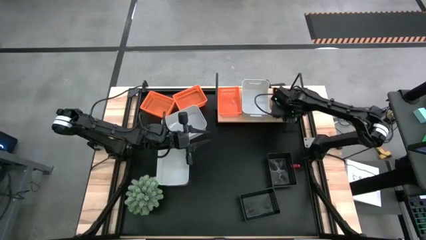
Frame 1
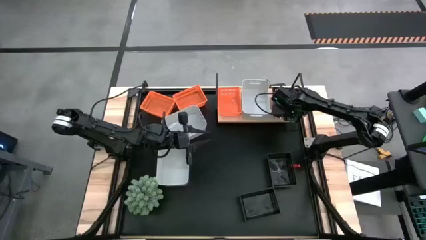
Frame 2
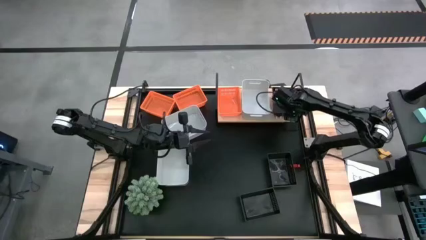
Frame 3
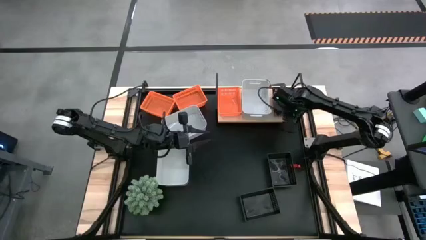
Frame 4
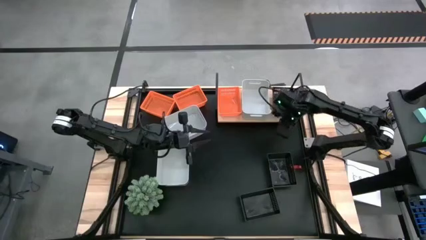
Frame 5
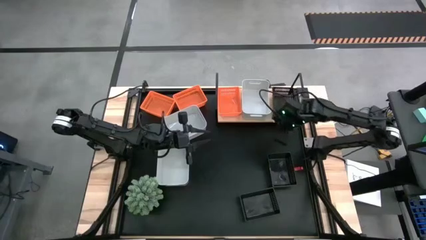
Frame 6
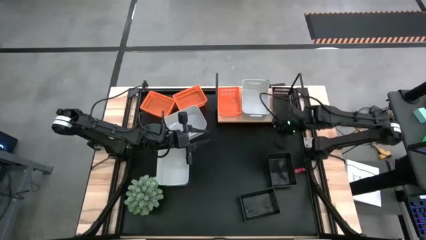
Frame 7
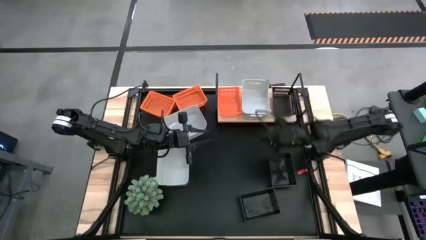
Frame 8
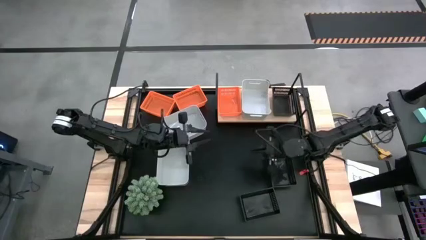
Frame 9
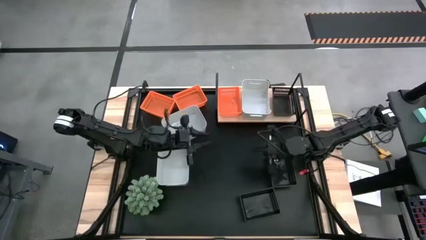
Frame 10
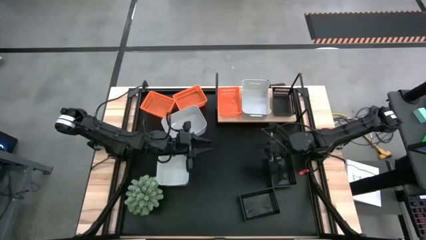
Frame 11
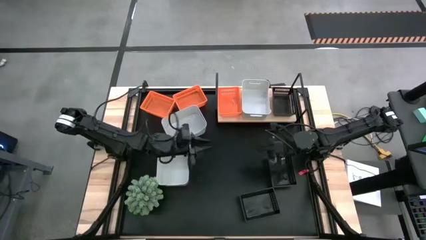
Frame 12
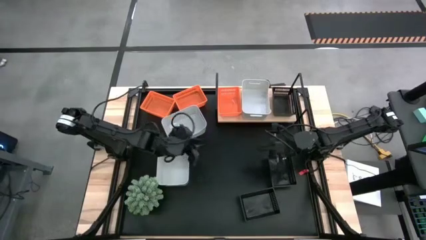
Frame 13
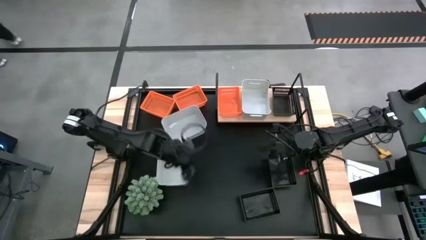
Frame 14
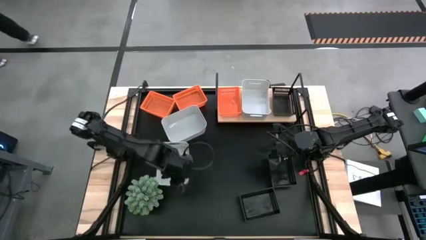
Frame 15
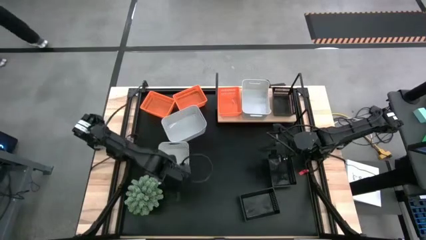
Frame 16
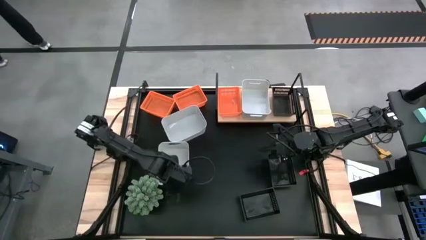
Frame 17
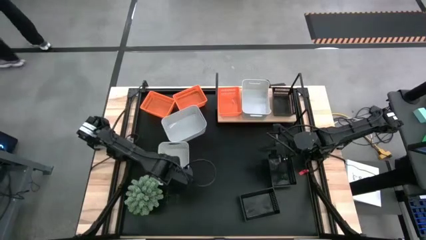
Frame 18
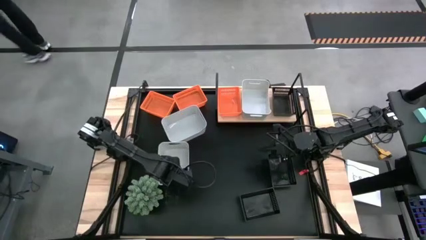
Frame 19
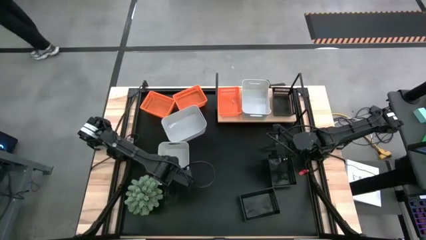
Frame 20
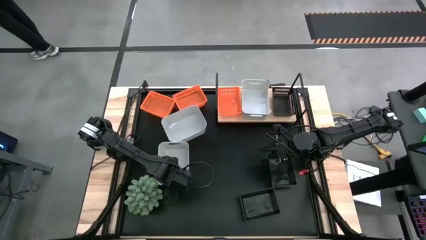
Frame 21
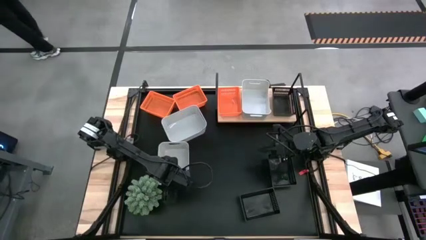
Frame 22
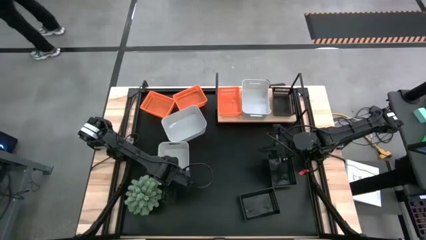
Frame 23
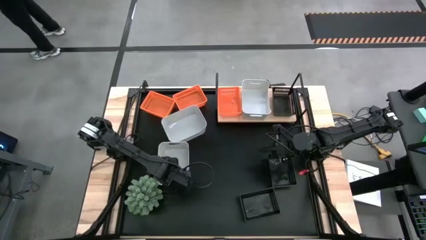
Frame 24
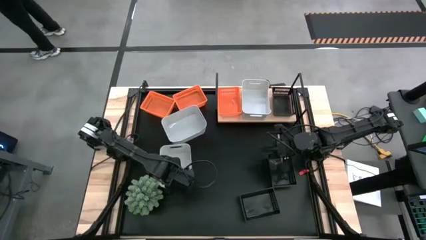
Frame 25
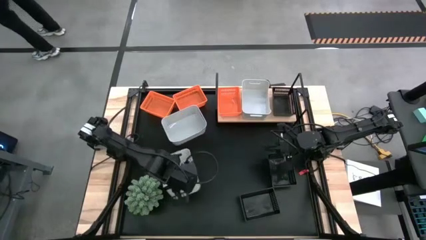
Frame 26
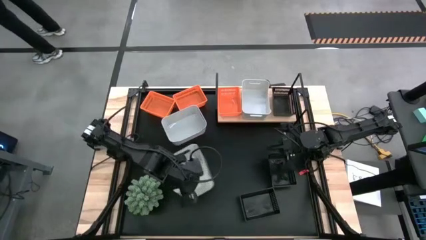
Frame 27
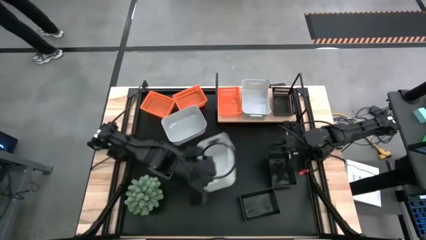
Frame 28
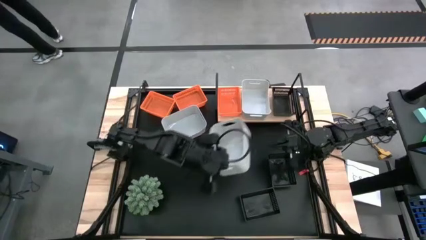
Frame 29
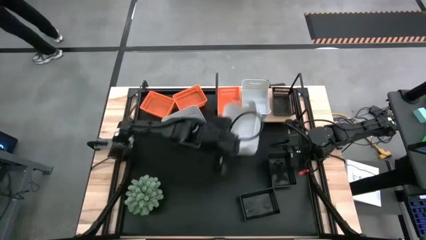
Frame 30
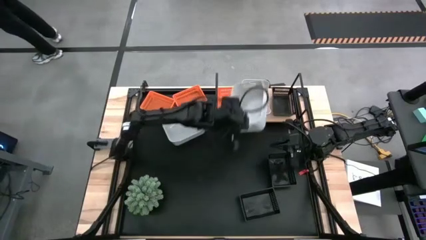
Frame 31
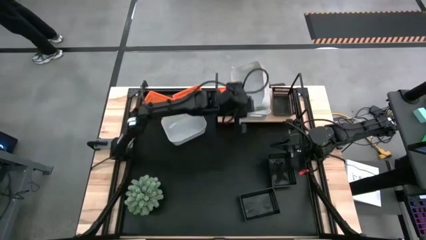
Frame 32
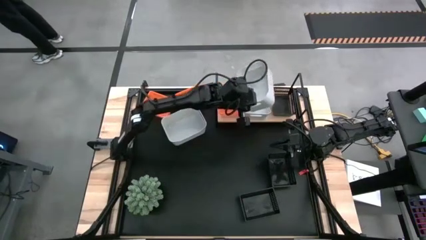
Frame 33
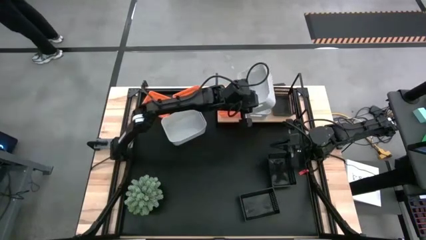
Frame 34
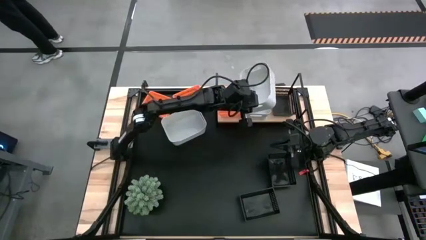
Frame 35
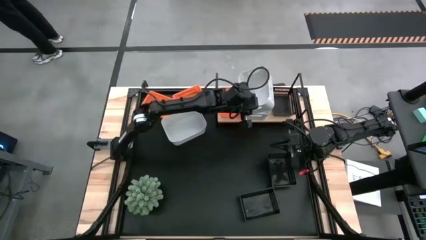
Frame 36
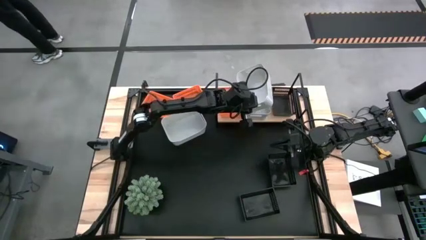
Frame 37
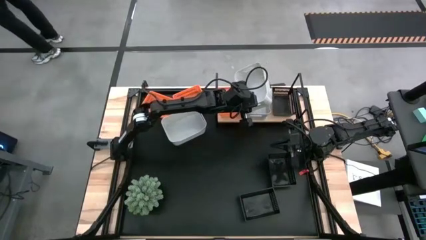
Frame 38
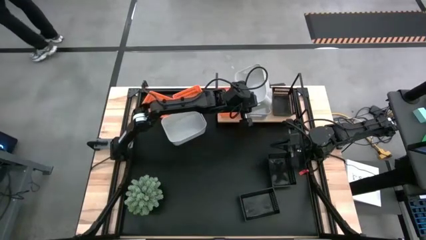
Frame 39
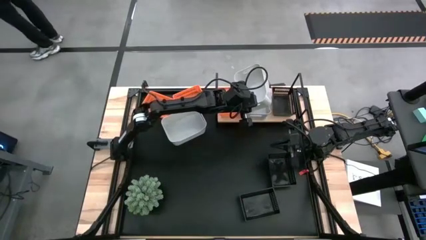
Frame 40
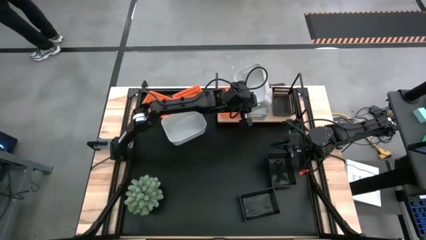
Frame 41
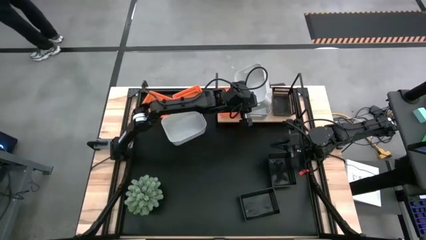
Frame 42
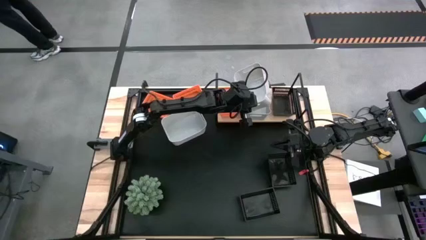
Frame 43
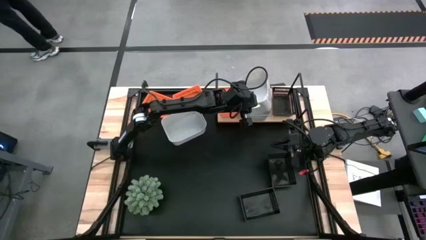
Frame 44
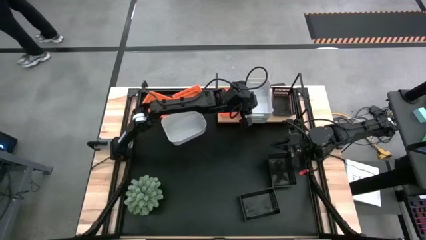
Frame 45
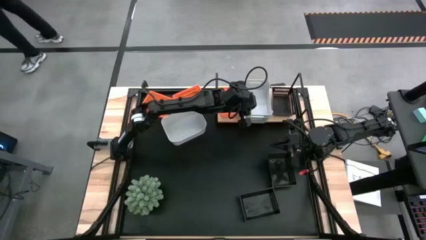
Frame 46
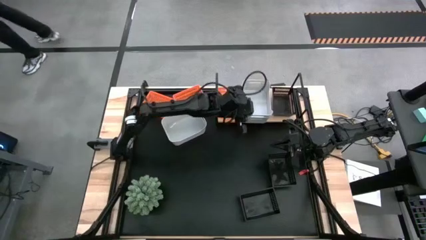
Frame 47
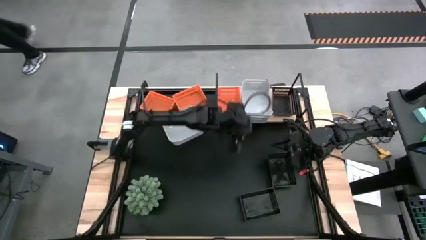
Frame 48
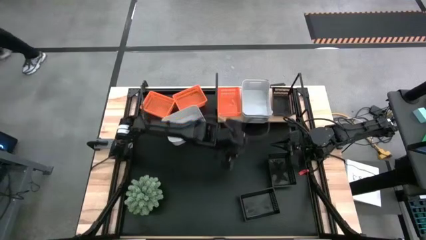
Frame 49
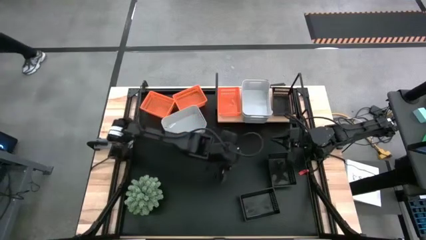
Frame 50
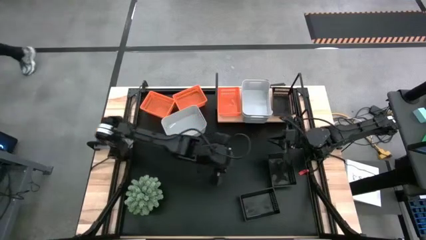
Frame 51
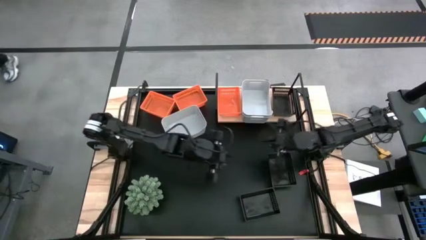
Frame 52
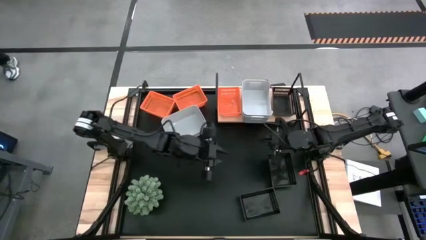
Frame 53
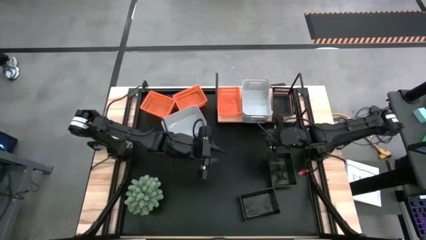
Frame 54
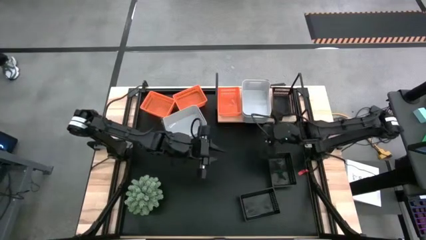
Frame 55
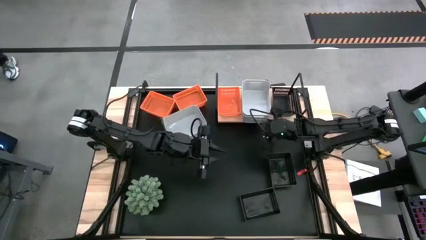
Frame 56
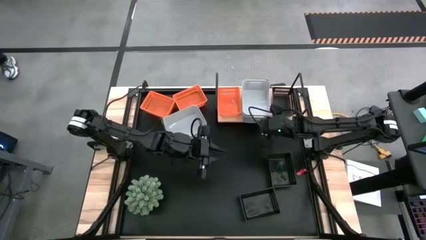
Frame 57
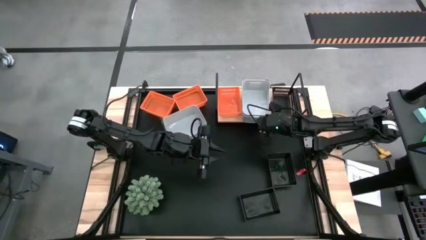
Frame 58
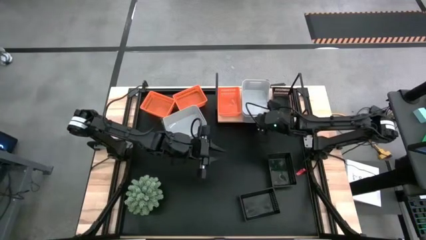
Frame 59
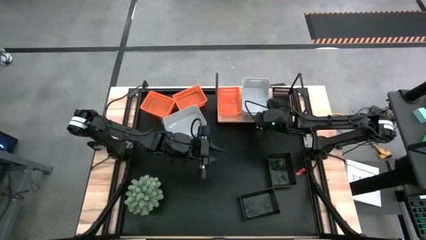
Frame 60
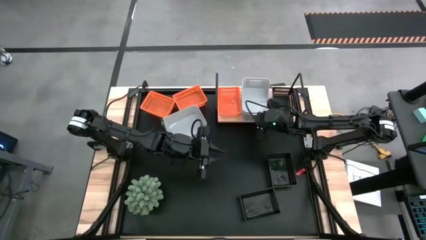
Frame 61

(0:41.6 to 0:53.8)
Task: Stack baskets on shelf by color
Stack the bottom white bin on top of the white bin on the shelf
